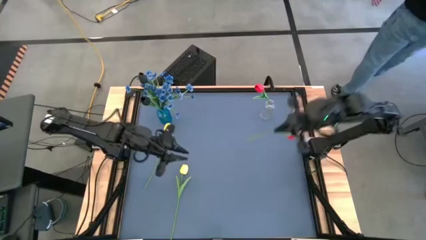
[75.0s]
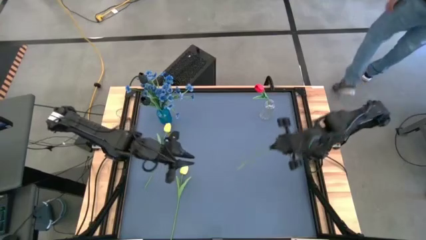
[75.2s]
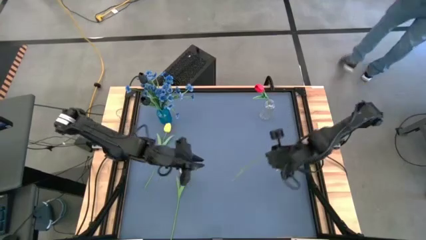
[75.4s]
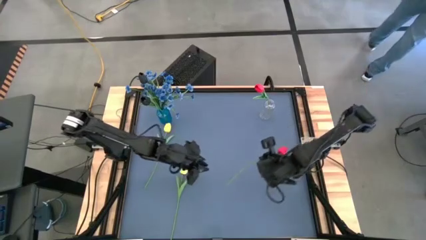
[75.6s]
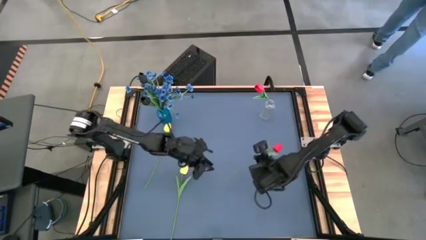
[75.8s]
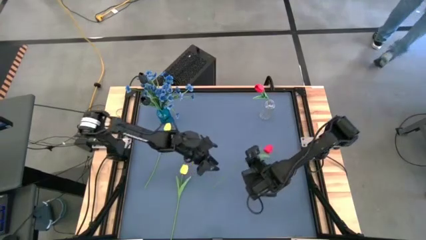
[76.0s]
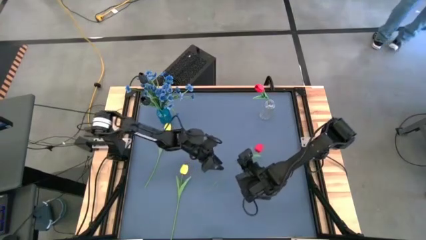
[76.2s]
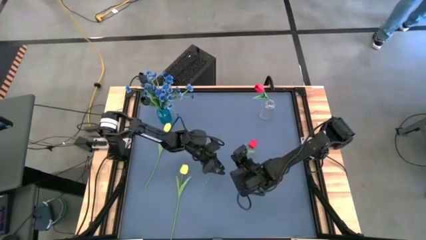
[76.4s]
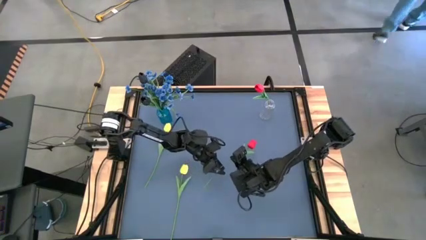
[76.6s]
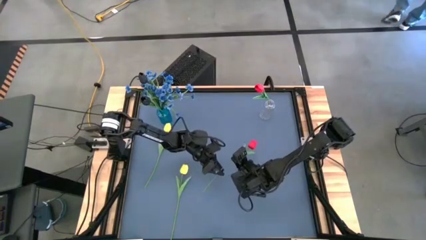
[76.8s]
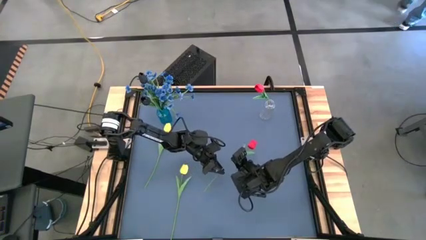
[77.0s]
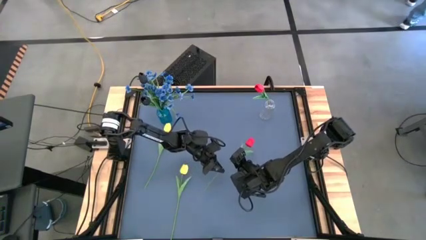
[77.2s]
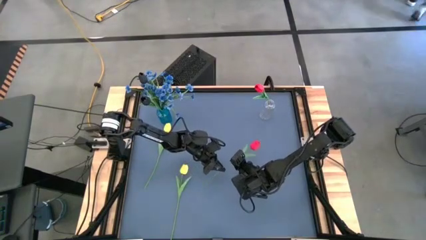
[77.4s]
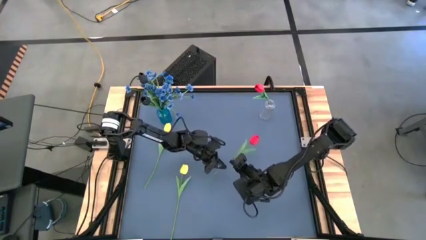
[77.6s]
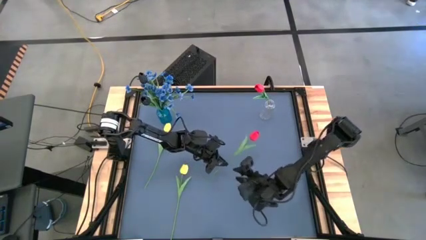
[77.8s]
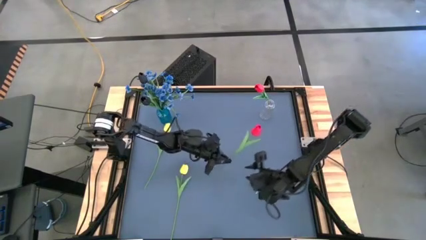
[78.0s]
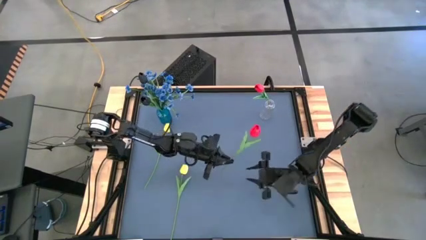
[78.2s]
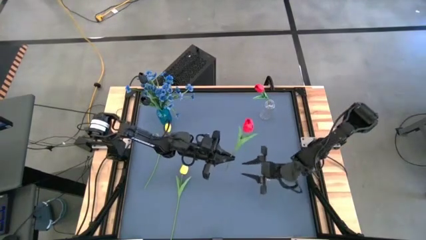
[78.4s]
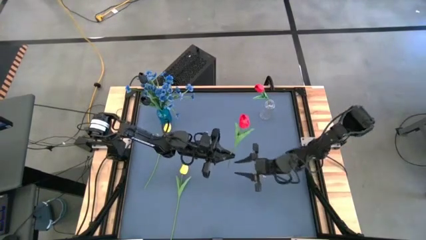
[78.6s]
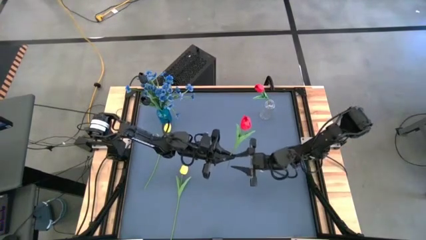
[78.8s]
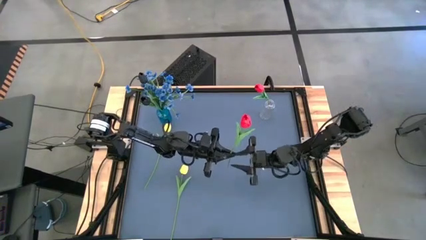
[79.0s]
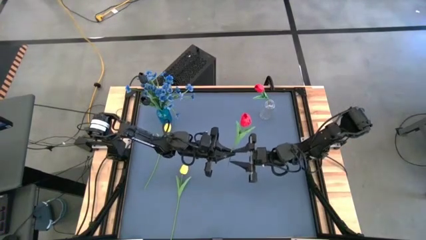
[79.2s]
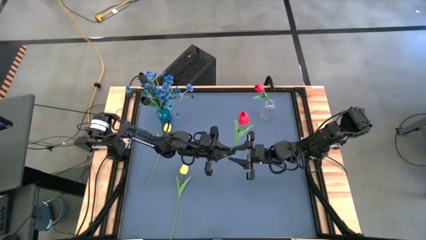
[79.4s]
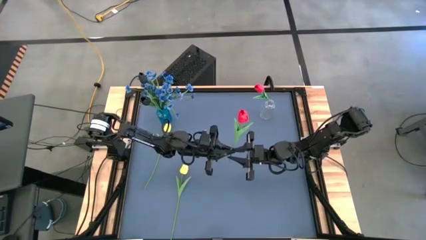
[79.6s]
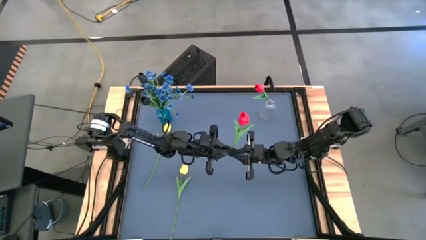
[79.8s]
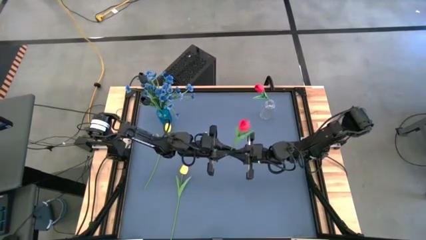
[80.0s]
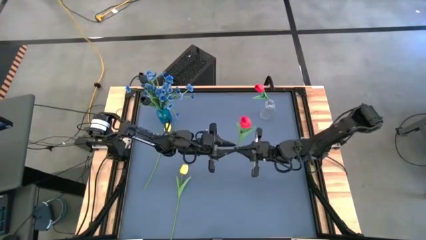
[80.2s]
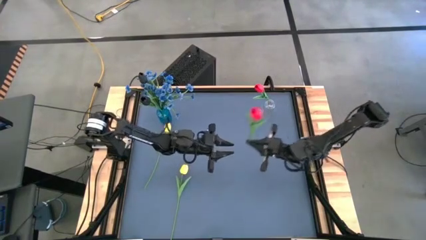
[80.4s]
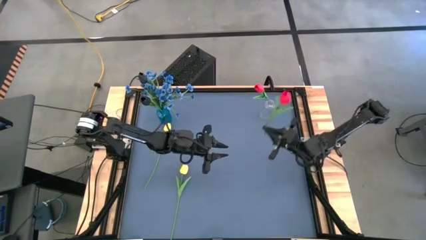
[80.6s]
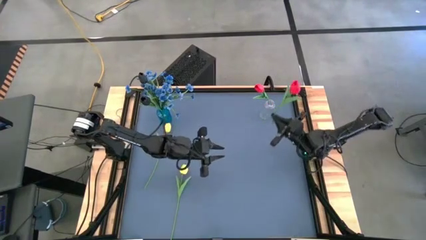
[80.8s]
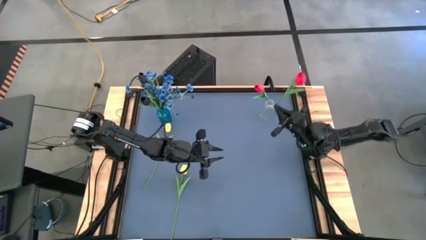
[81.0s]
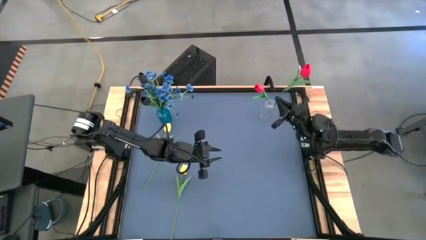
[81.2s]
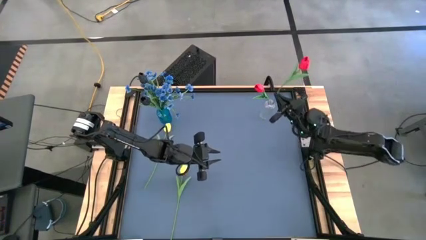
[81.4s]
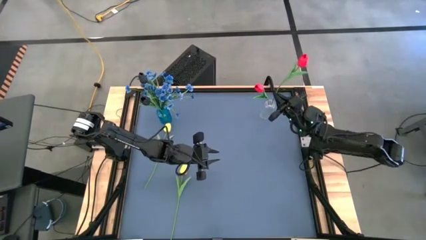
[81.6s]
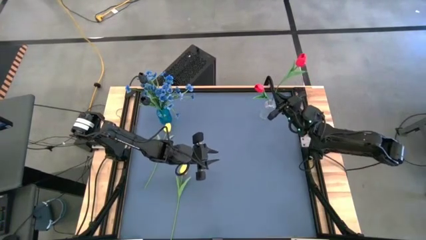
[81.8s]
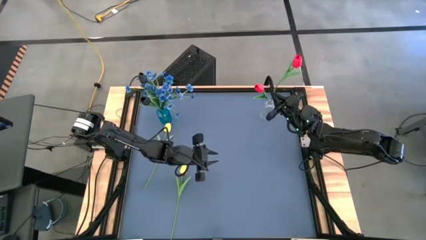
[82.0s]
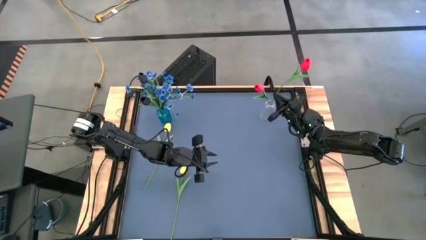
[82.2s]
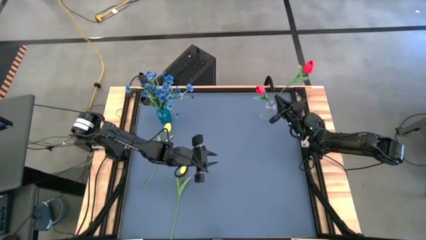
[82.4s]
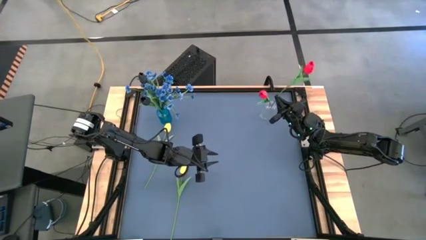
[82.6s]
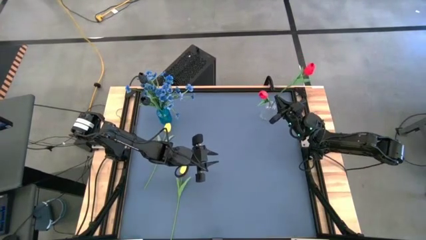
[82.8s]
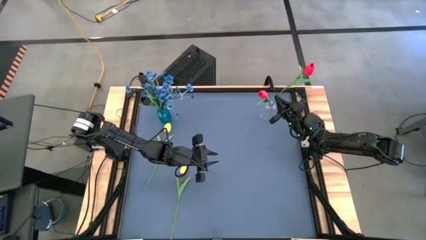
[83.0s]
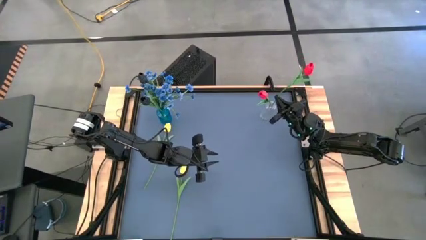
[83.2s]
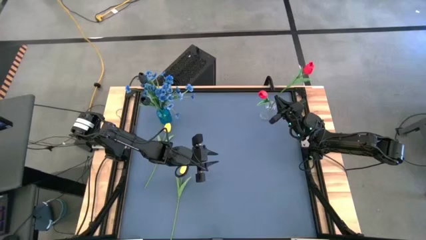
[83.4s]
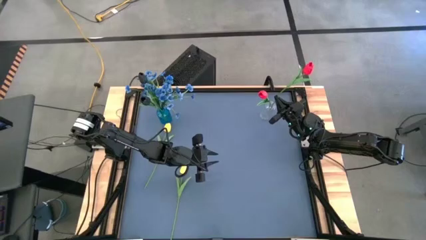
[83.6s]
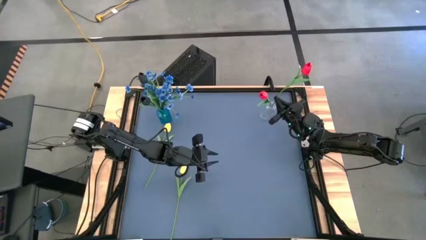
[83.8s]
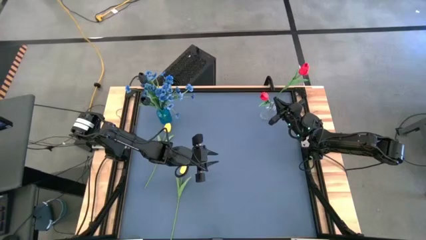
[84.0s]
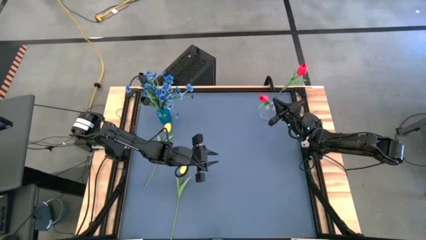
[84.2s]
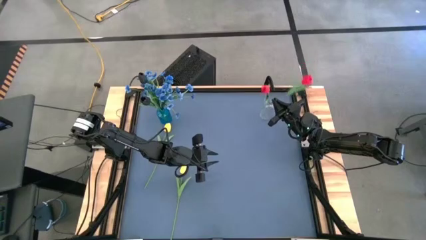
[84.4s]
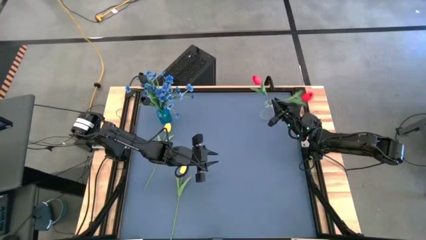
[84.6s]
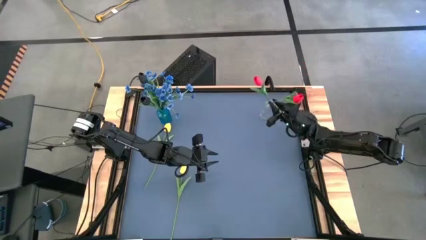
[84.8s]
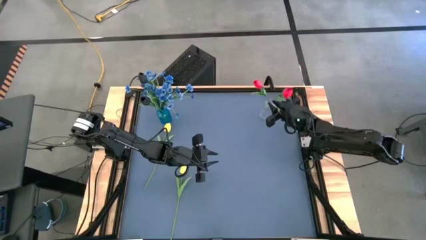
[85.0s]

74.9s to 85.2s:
Task: Sort flowers into vase by color
Put the red tulip into the transparent vase

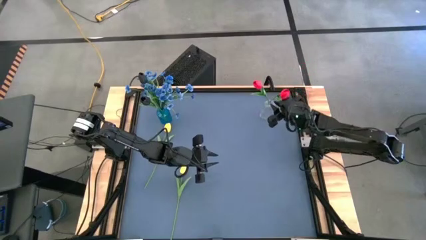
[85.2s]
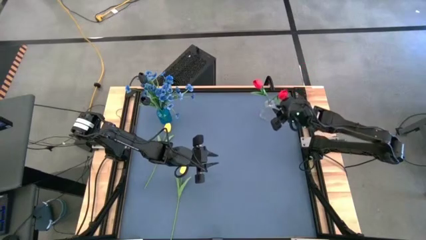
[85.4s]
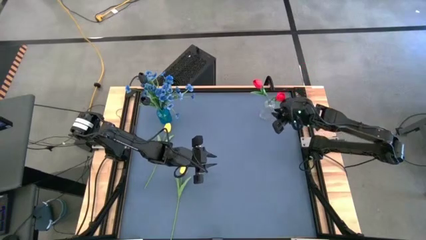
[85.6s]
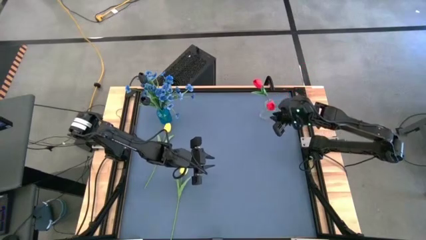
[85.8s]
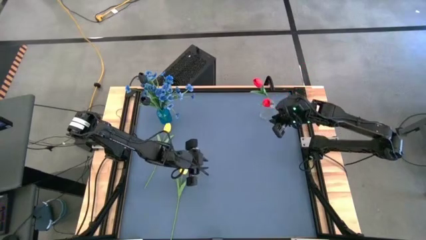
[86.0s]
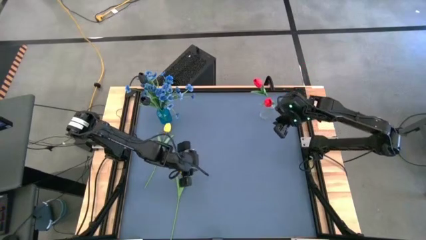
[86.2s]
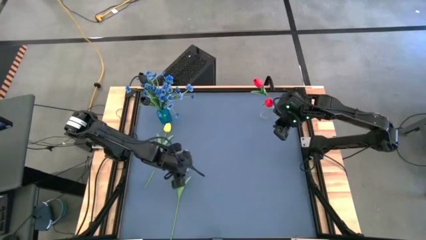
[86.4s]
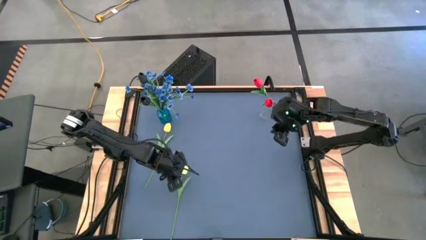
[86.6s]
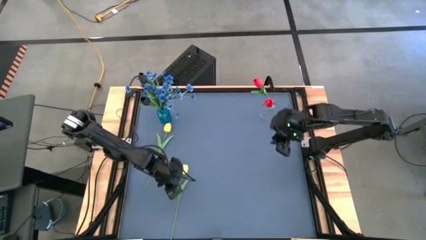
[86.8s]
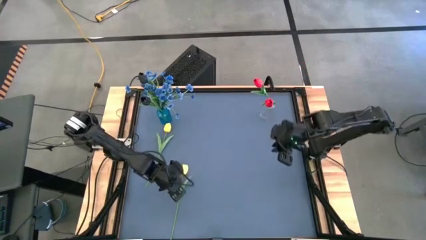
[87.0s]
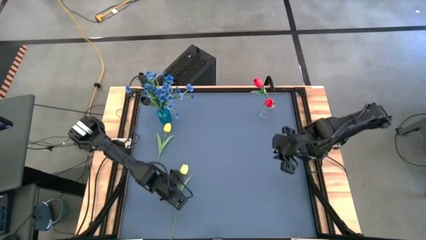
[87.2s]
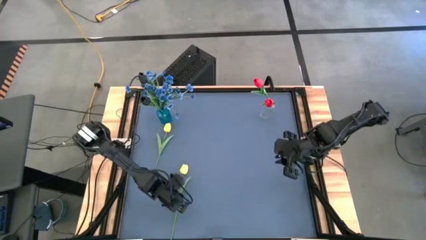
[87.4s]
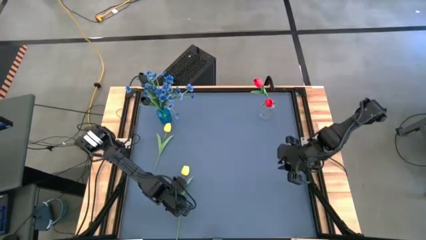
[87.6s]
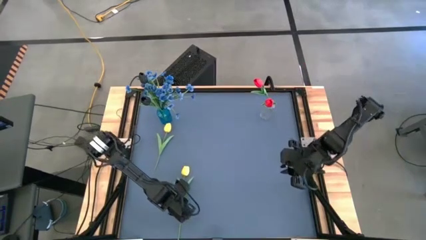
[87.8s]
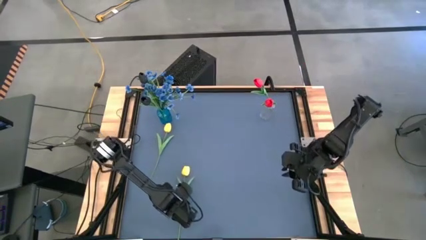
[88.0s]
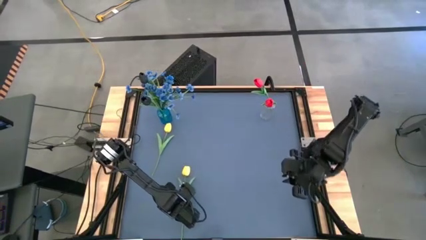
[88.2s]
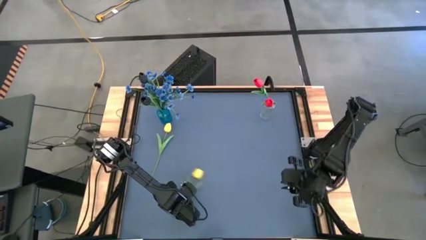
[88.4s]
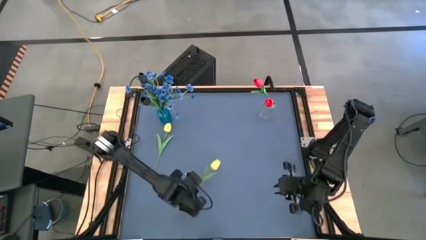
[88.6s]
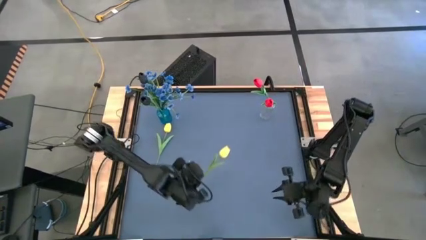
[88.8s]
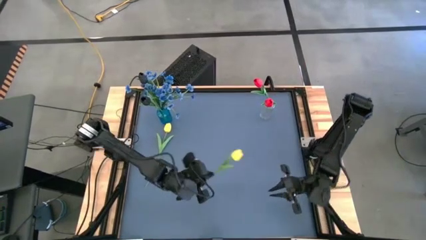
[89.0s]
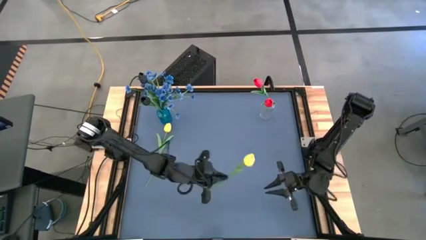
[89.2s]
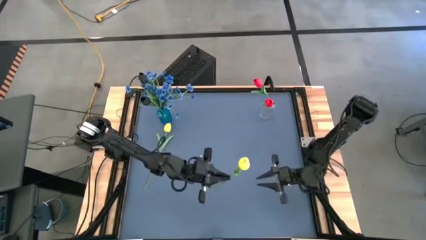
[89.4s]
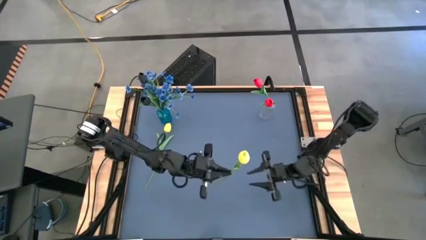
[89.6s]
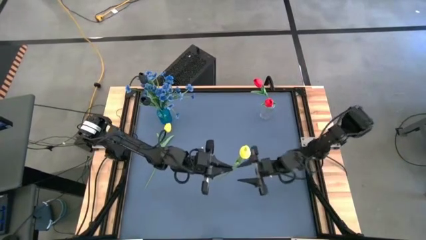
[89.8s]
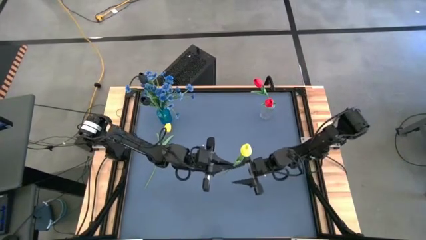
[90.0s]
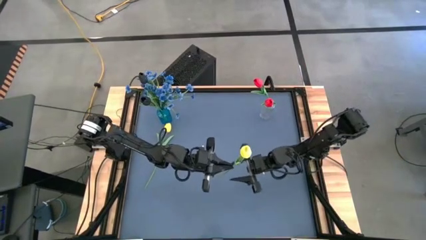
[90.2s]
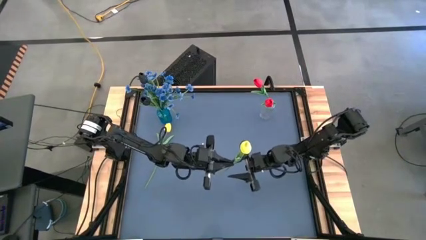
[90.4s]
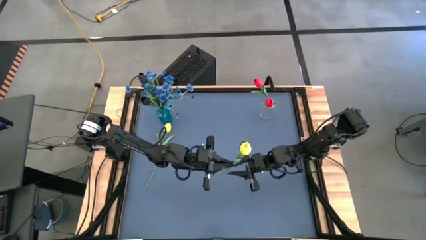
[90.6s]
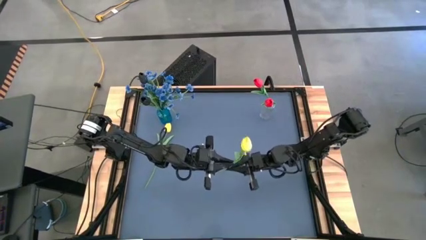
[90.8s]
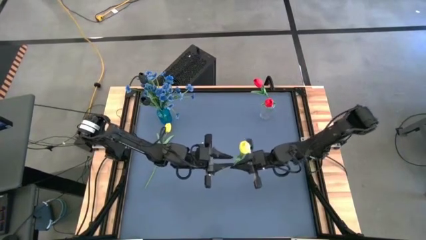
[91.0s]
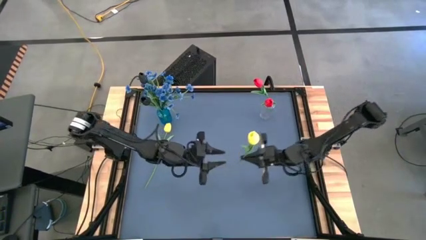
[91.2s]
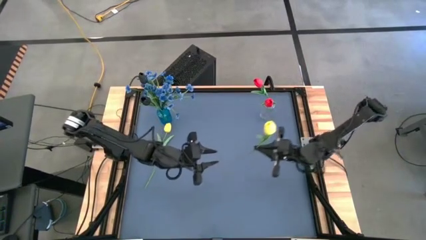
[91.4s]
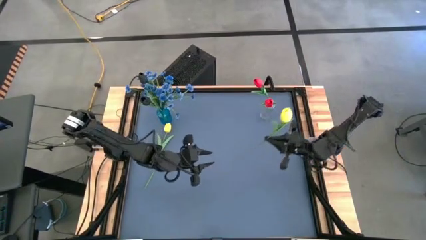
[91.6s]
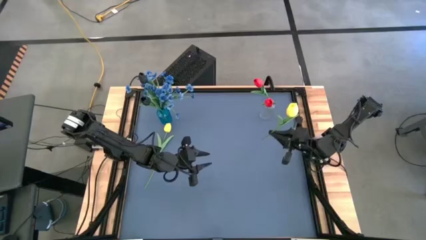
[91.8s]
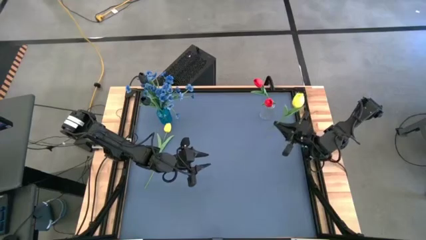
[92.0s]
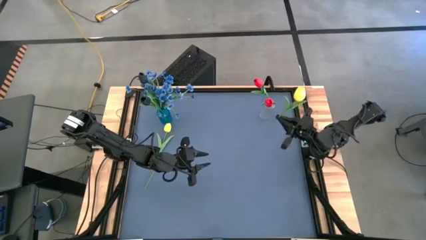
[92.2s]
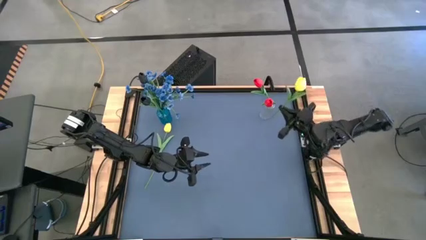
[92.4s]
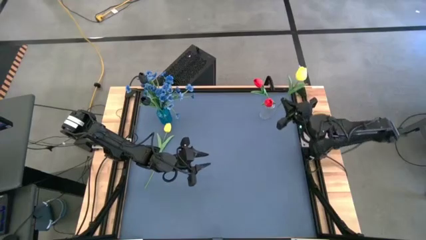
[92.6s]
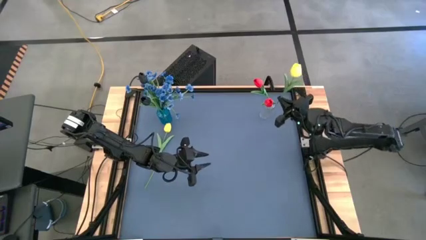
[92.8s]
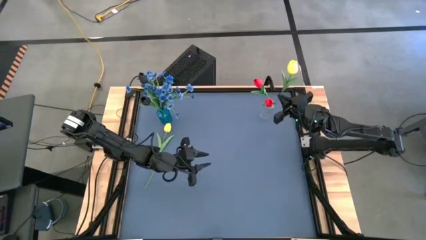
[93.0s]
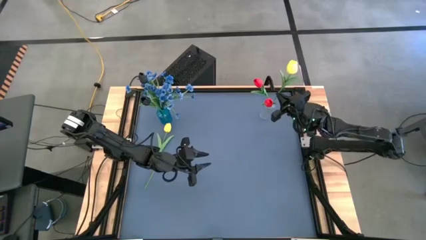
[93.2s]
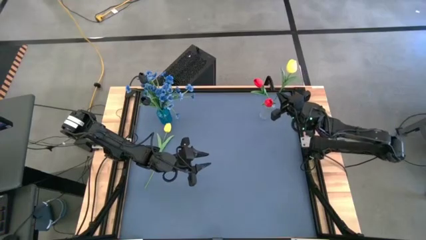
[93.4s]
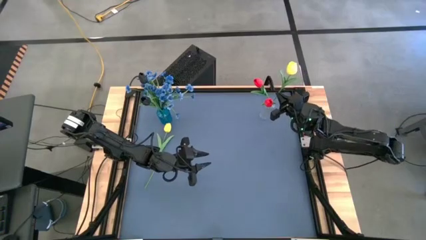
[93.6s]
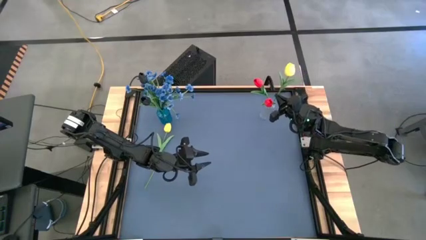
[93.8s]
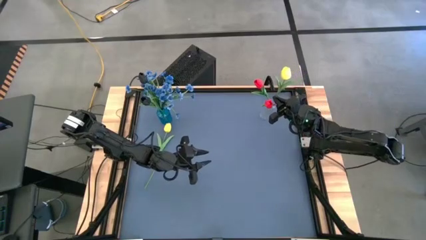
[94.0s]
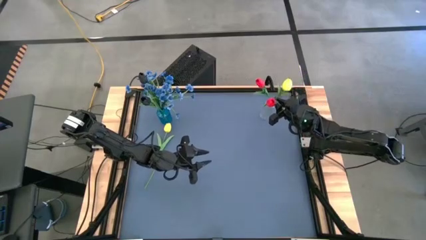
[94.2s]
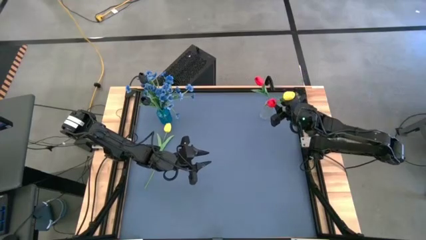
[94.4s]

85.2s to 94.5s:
Put the bottom yellow tulip into the transparent vase
